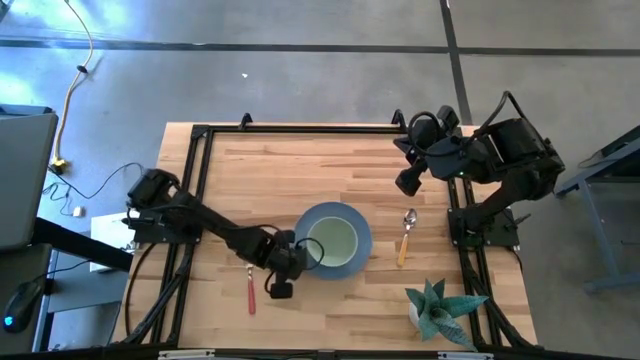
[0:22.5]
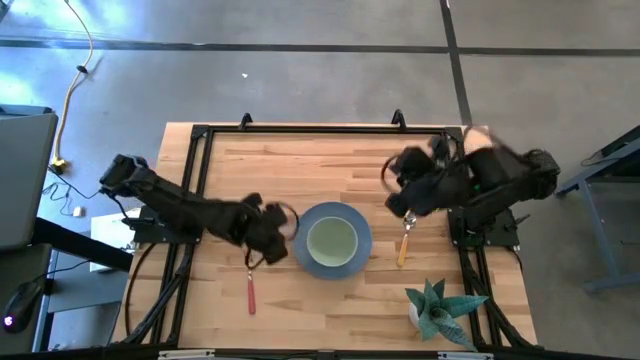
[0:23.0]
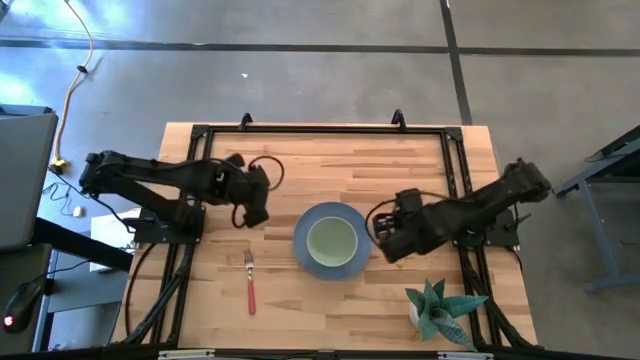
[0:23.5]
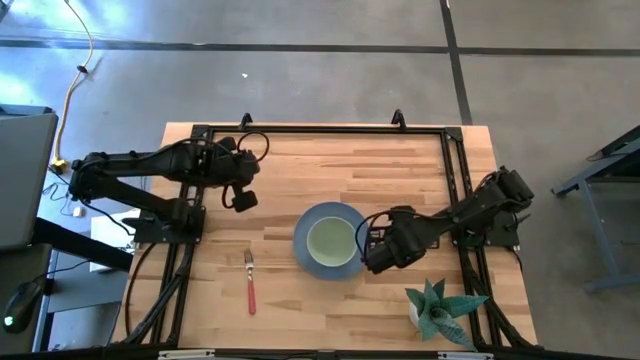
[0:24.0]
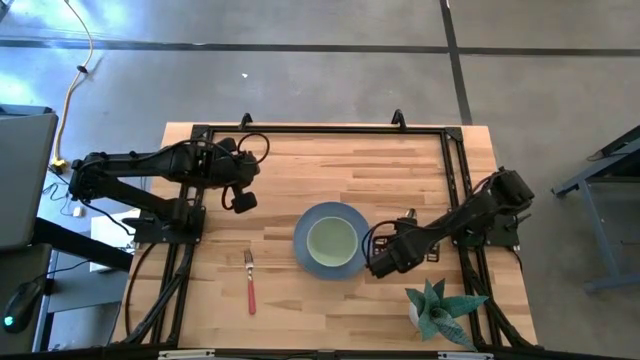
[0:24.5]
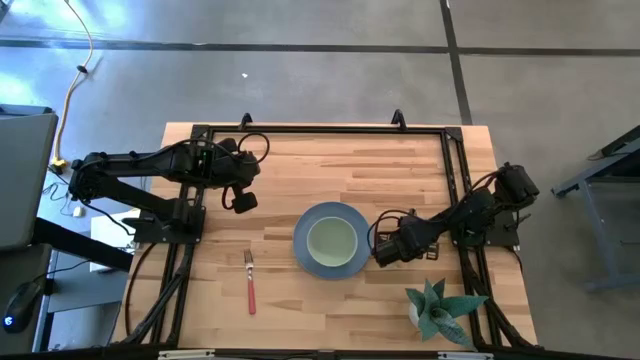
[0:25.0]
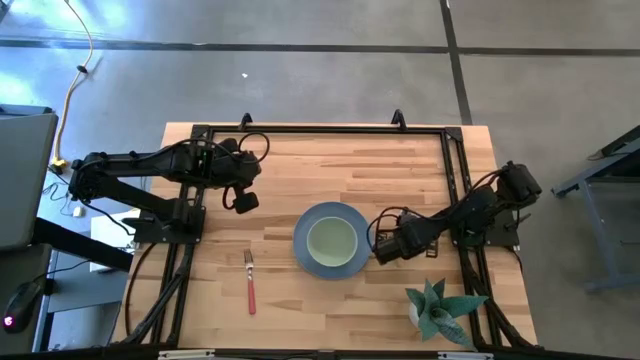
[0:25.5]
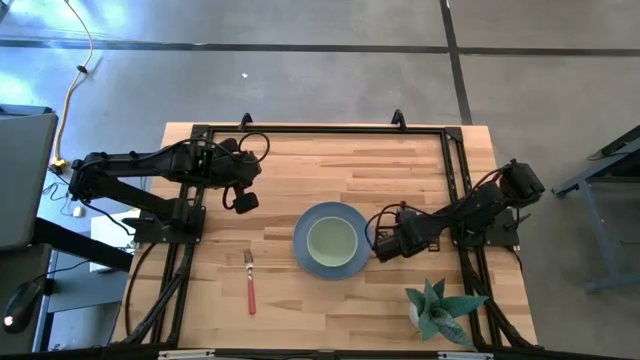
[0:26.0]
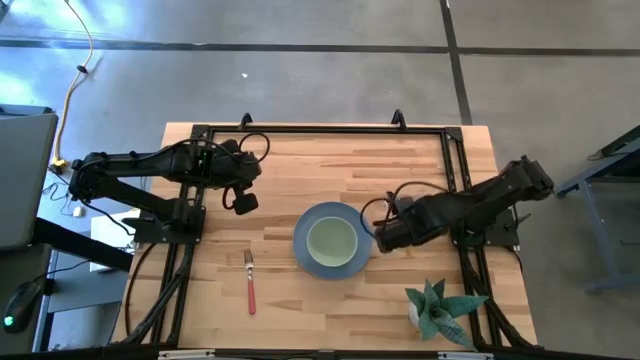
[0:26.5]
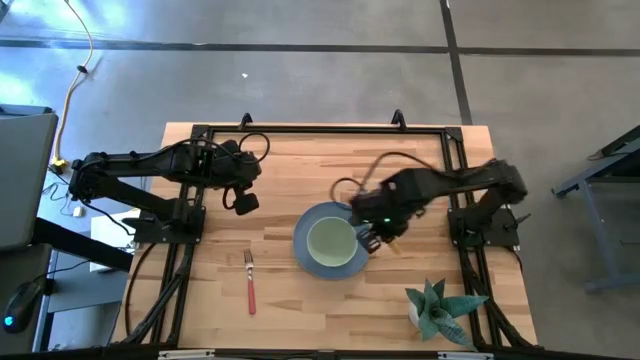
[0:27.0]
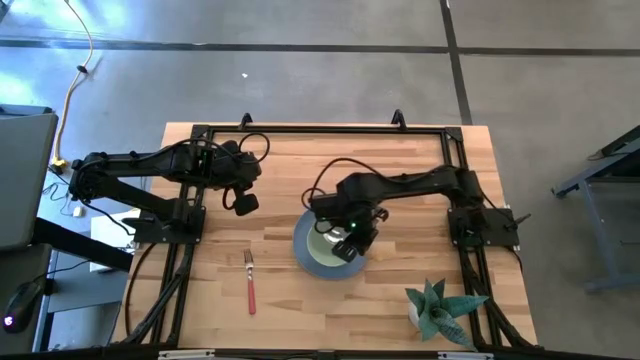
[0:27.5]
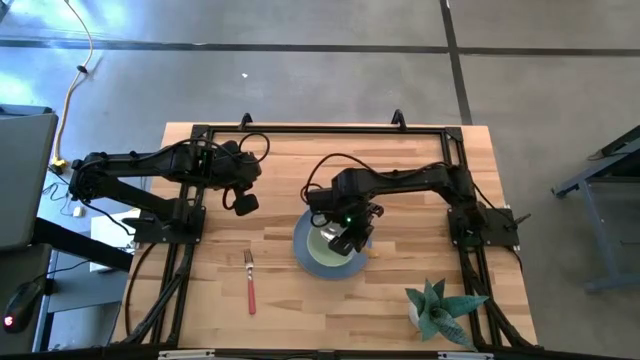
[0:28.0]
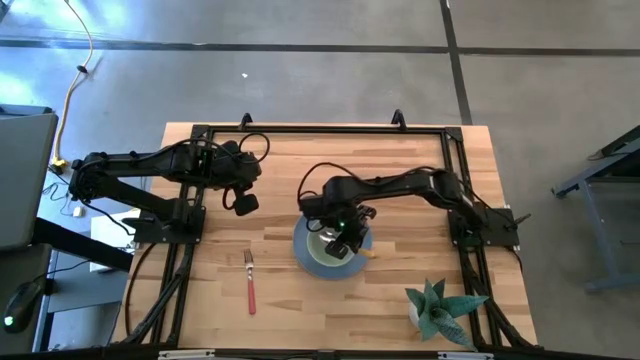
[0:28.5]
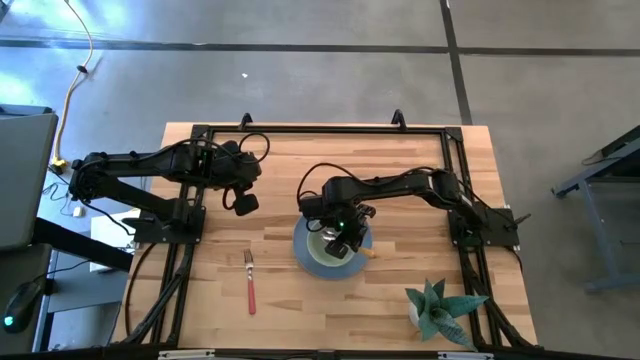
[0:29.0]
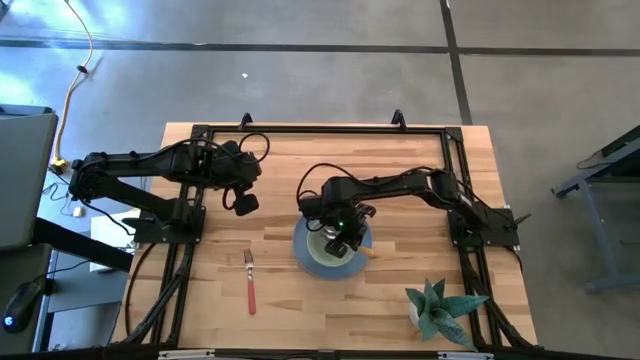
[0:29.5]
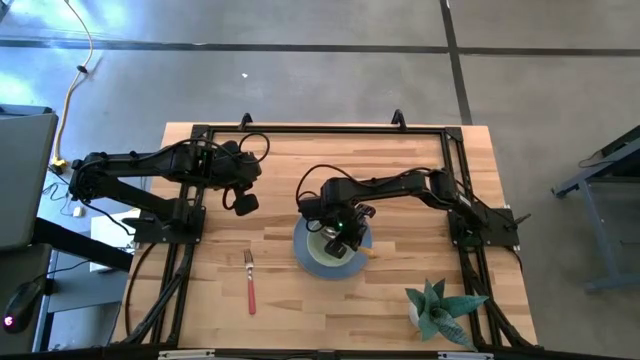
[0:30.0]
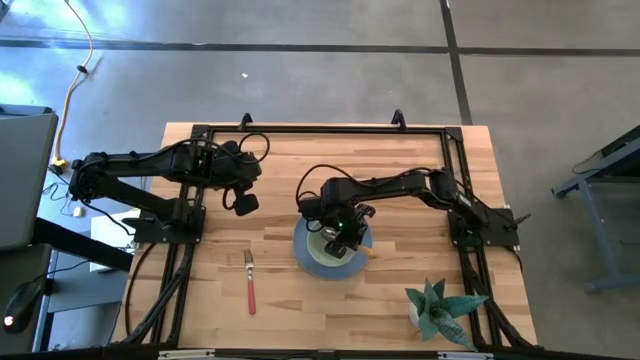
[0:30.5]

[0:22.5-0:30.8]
Task: Set table place
Put the yellow spoon into the green bowl

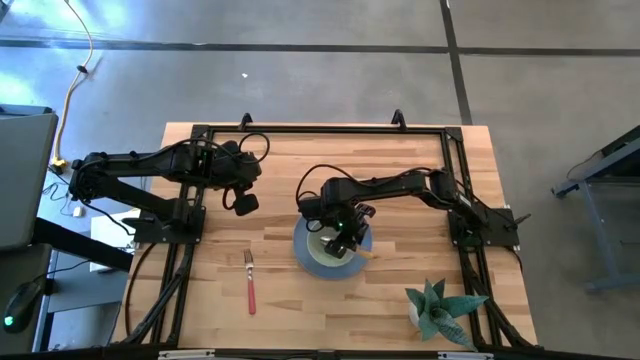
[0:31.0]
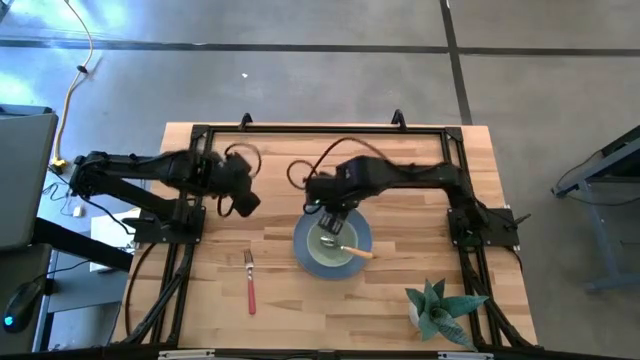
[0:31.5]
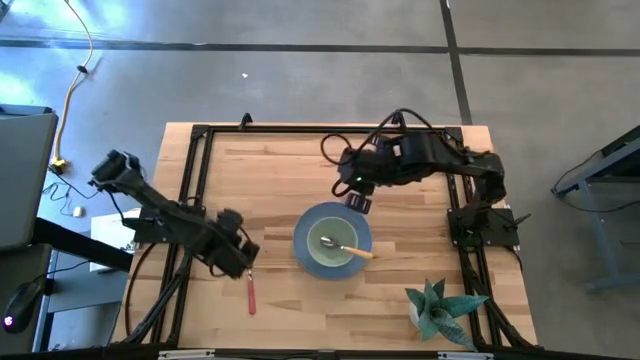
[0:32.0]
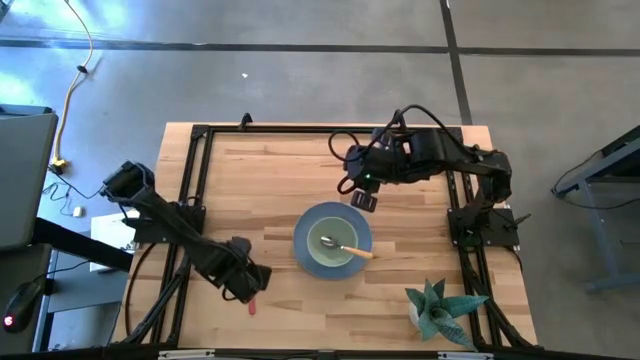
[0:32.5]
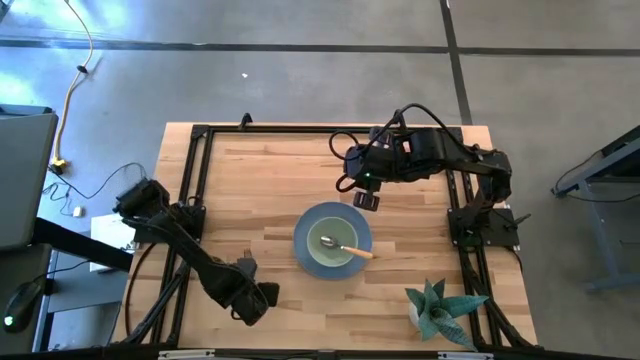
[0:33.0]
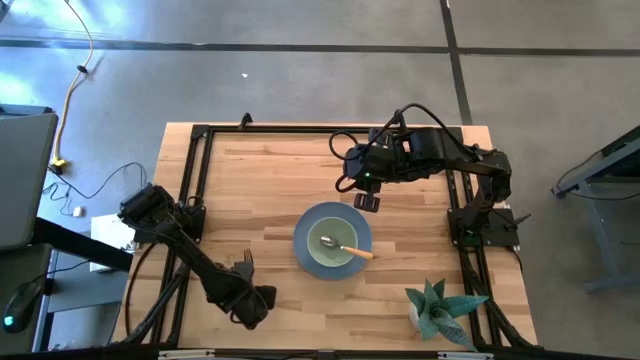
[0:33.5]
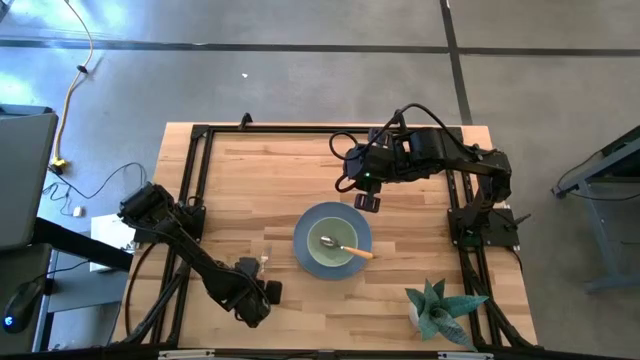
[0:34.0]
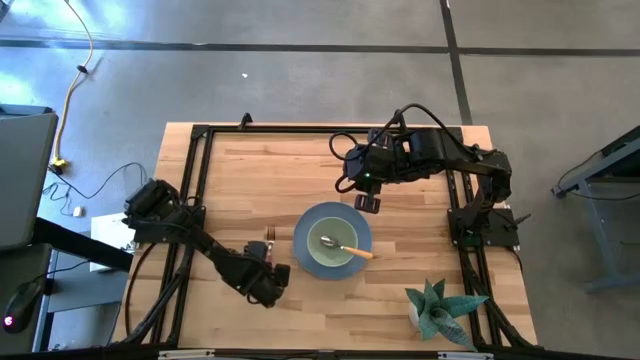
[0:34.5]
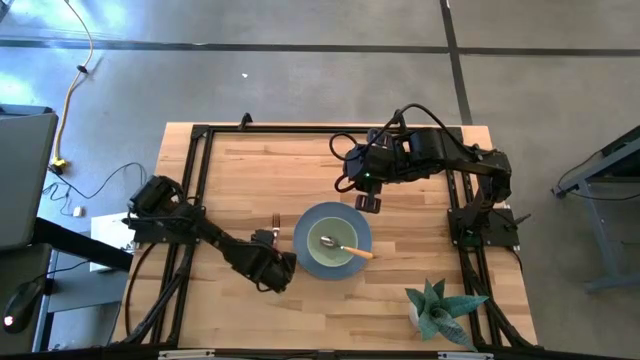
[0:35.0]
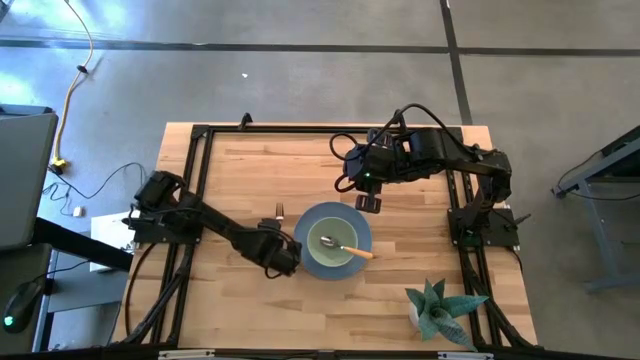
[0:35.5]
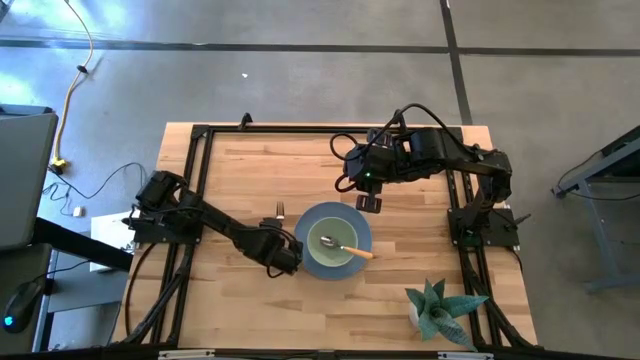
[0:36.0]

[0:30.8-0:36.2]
Put the pink plate on the left side of the blue plate

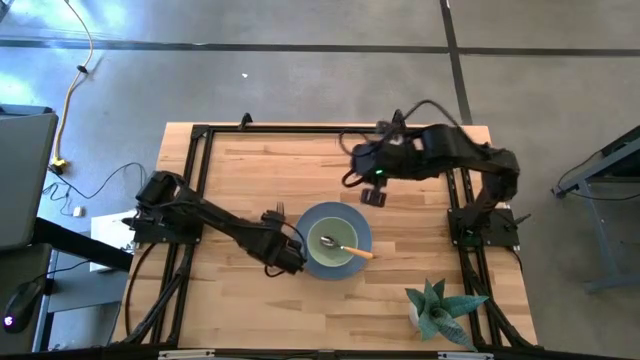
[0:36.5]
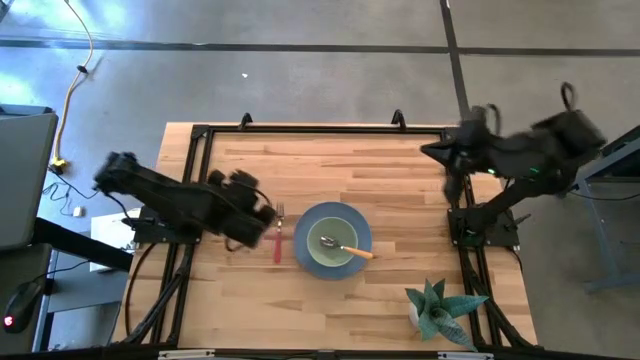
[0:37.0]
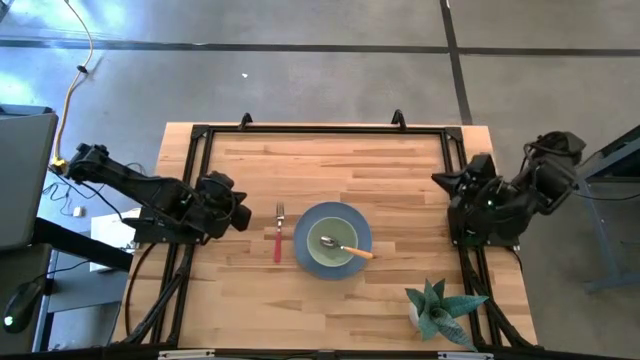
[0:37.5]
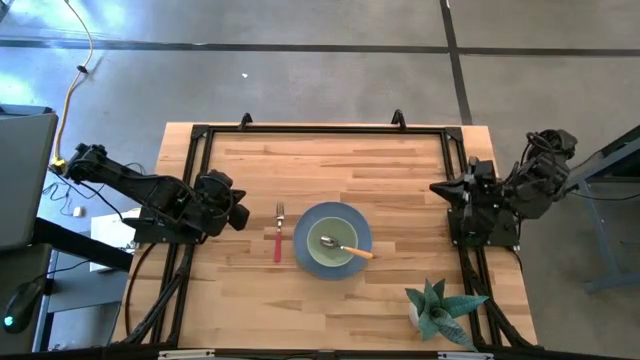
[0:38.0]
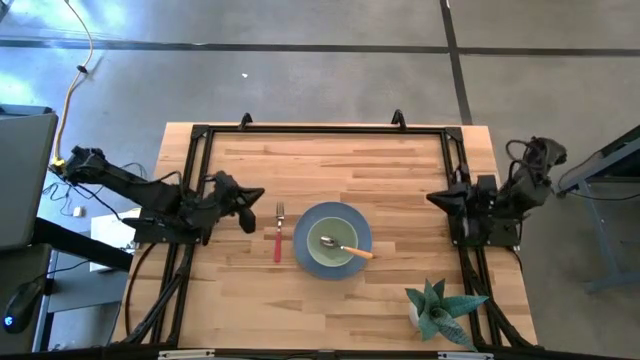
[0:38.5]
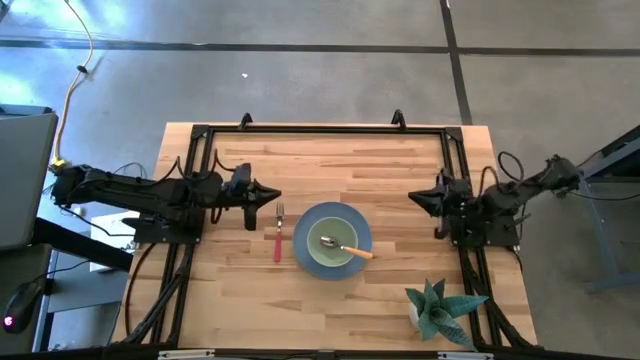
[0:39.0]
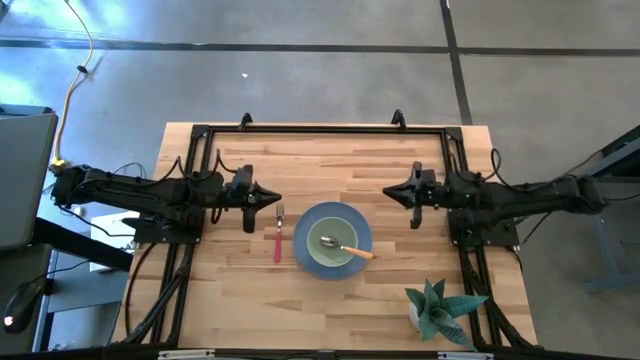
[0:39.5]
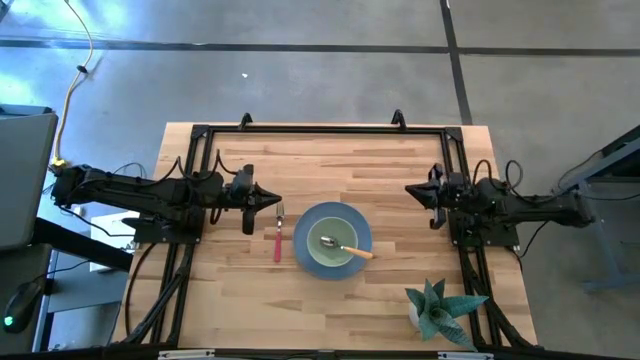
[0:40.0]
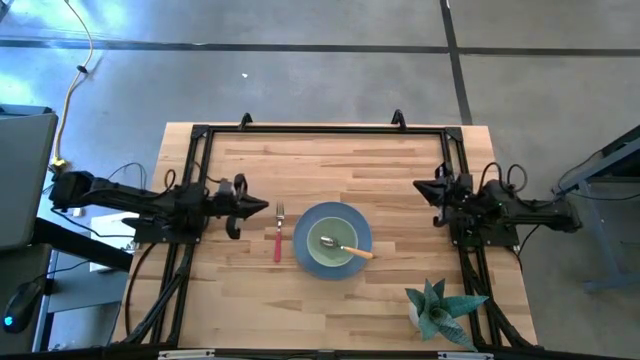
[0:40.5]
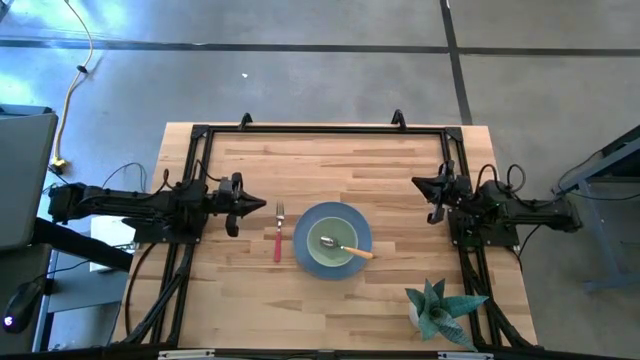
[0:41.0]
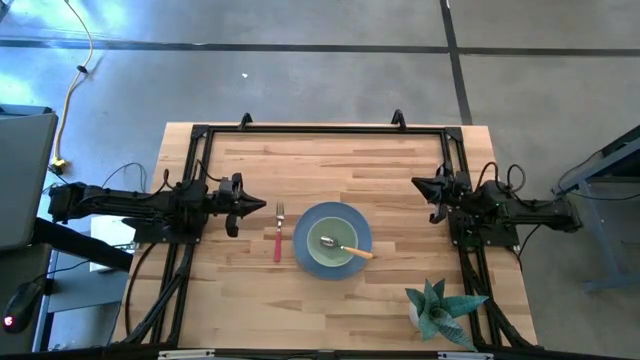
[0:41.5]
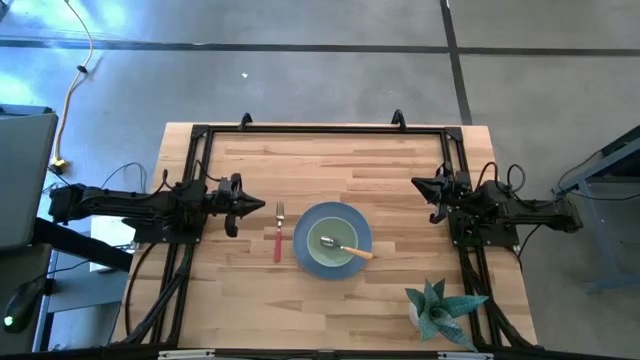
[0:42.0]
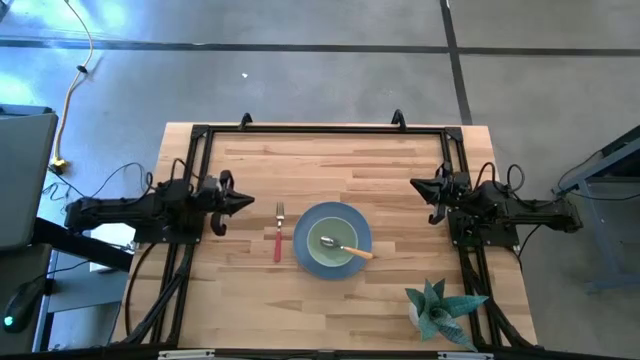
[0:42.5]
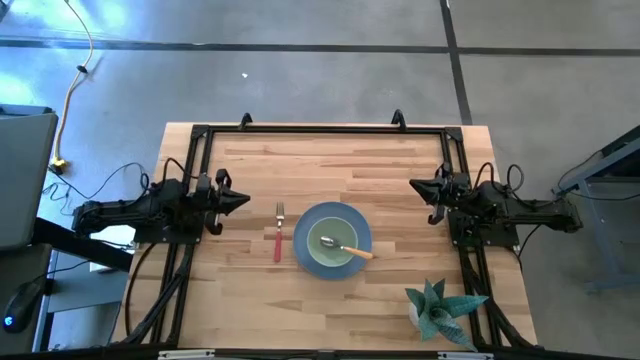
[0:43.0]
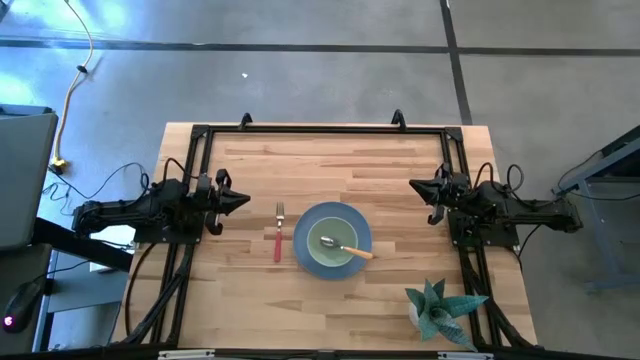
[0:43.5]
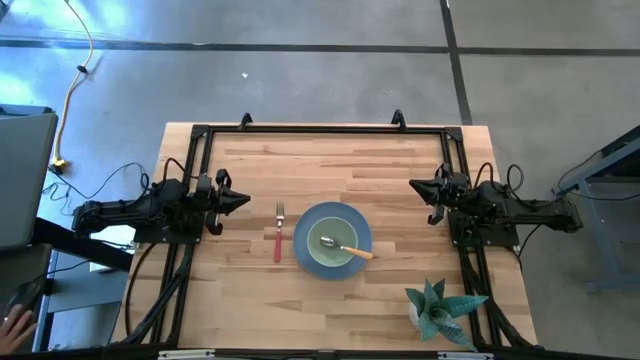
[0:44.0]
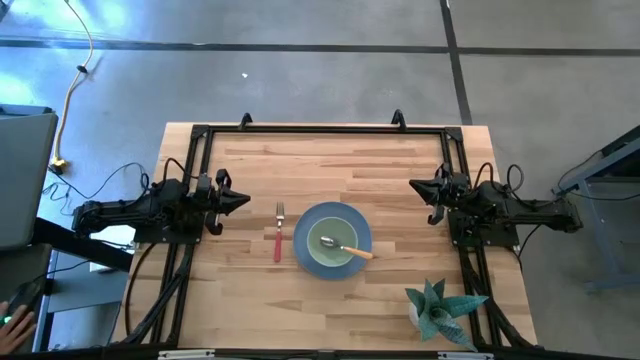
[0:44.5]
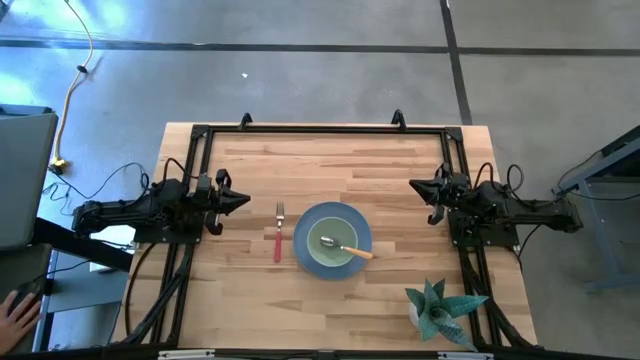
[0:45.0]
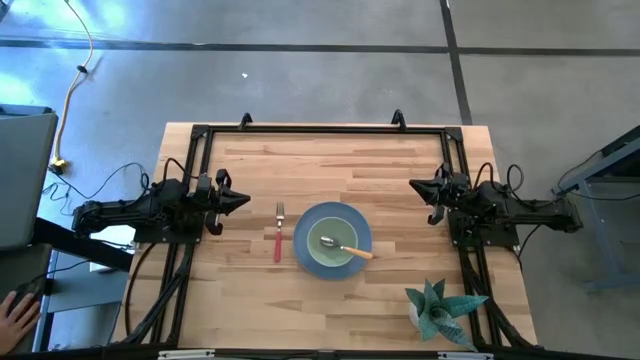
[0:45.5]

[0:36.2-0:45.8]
Return to Home Position
